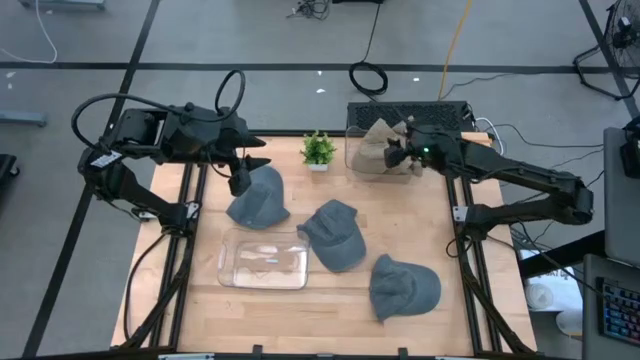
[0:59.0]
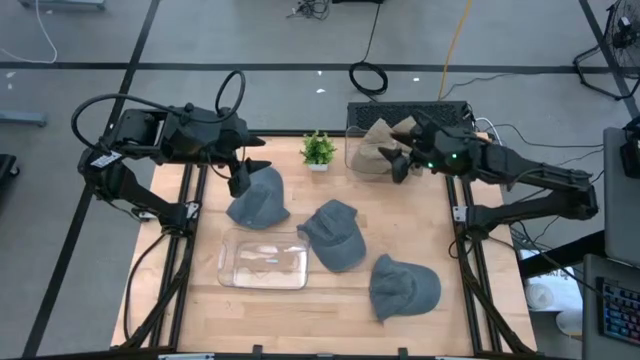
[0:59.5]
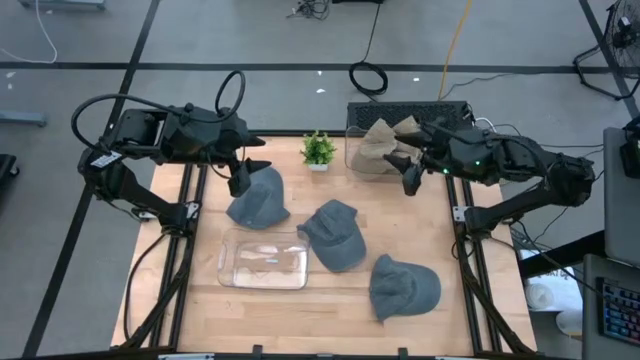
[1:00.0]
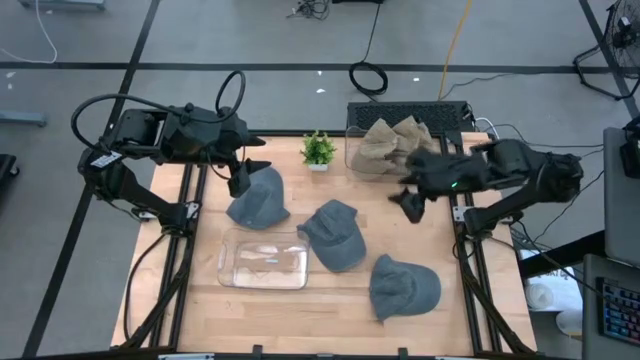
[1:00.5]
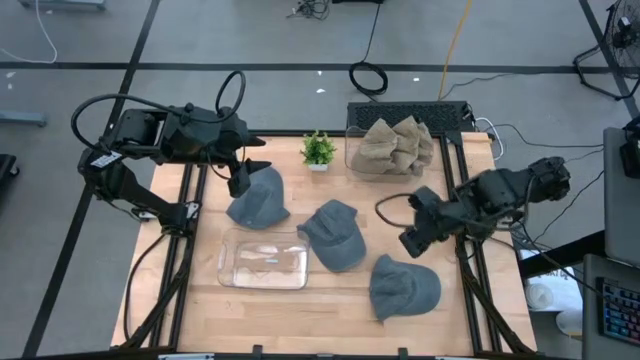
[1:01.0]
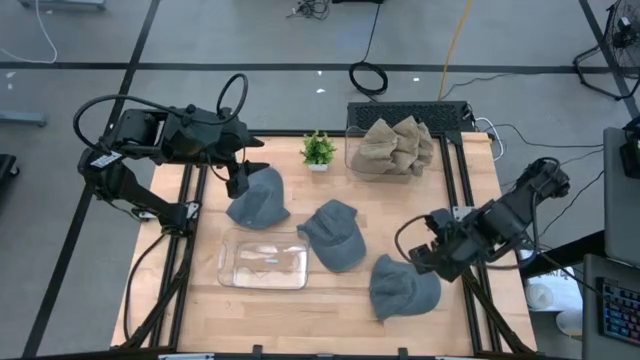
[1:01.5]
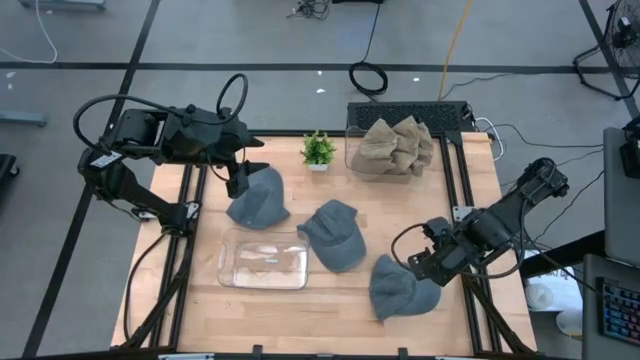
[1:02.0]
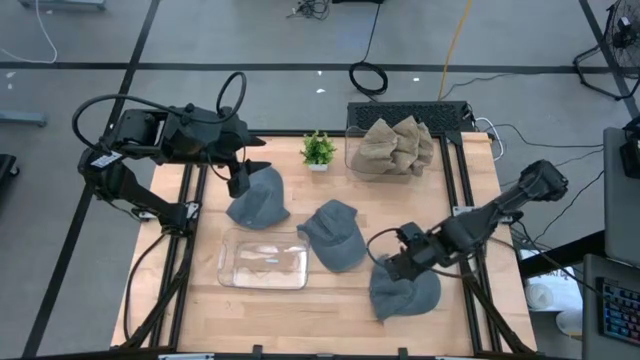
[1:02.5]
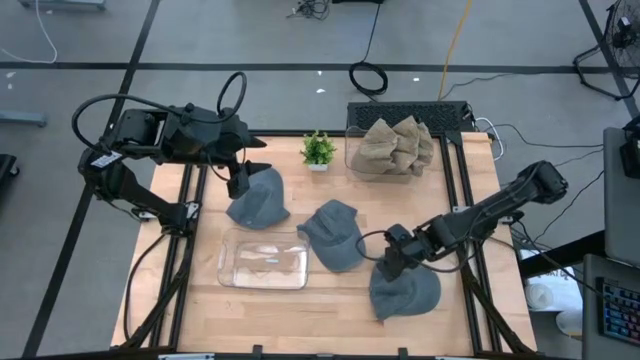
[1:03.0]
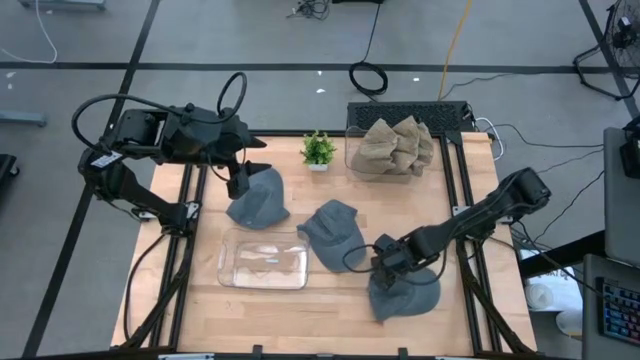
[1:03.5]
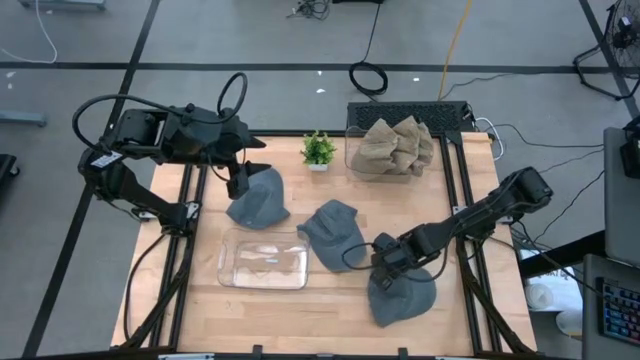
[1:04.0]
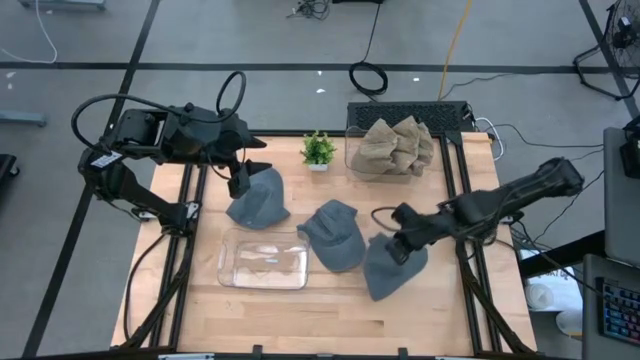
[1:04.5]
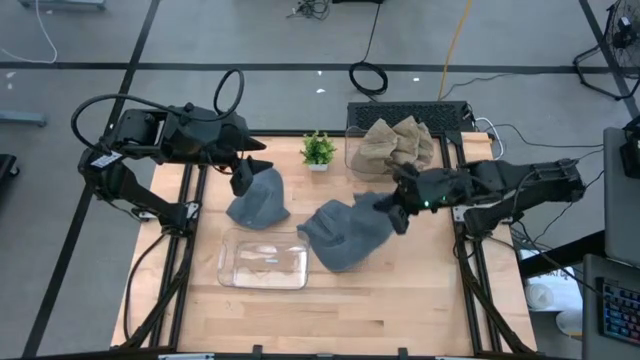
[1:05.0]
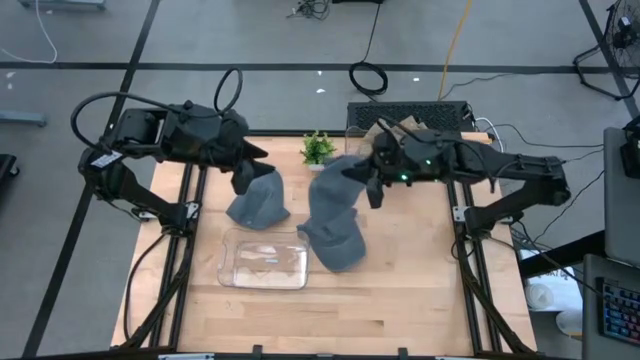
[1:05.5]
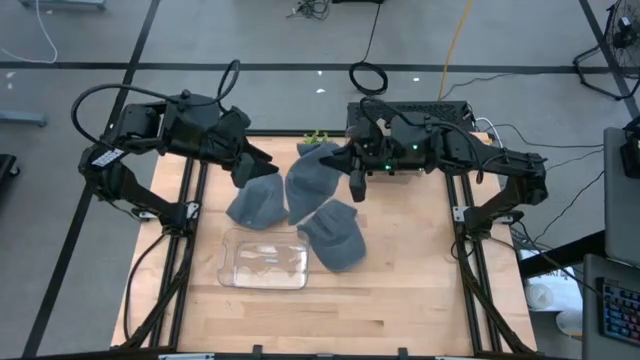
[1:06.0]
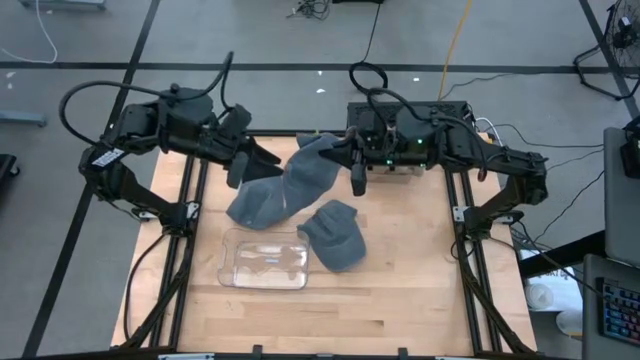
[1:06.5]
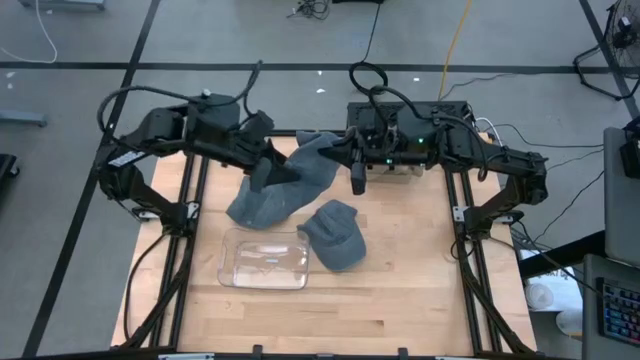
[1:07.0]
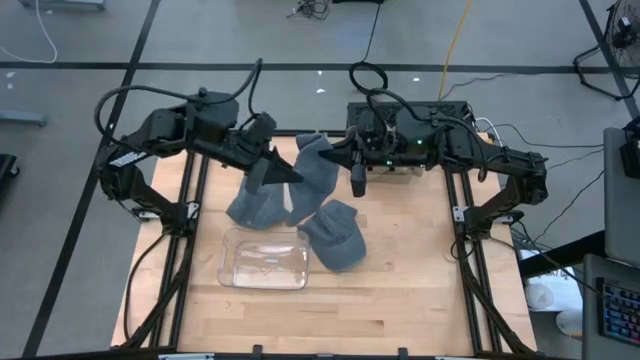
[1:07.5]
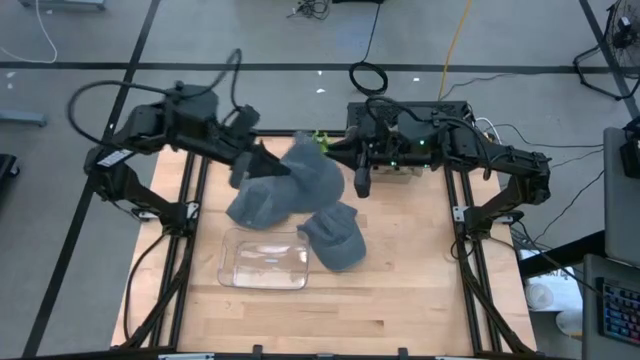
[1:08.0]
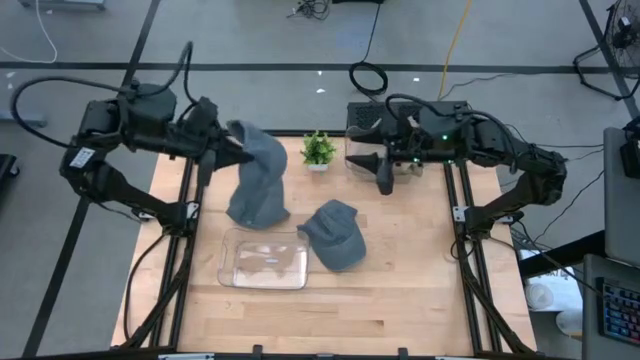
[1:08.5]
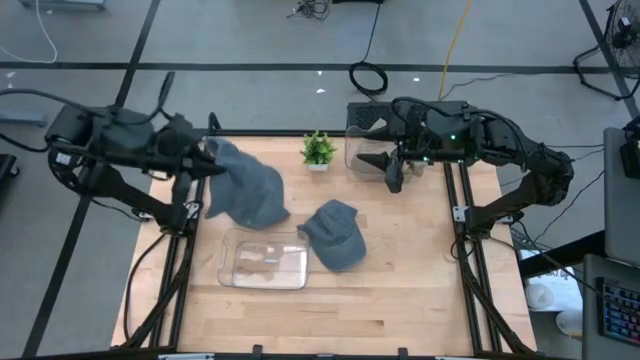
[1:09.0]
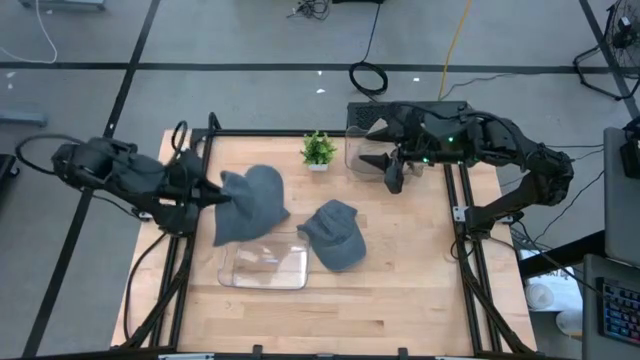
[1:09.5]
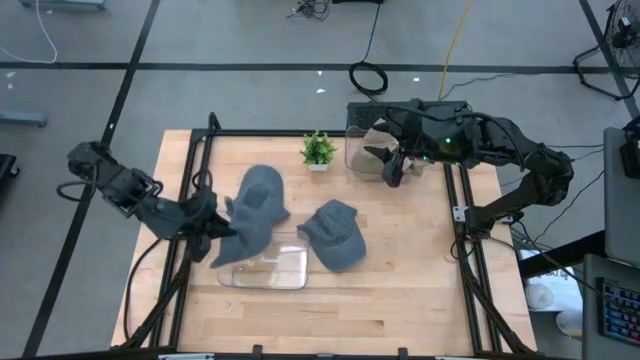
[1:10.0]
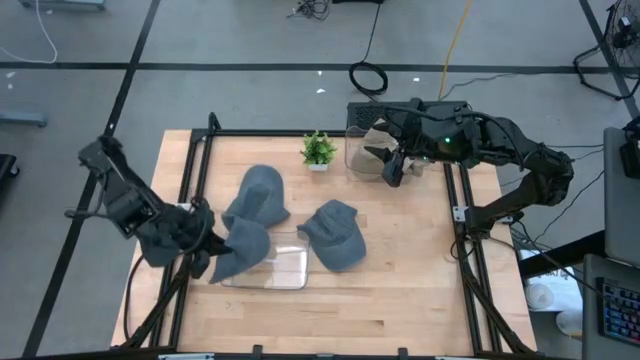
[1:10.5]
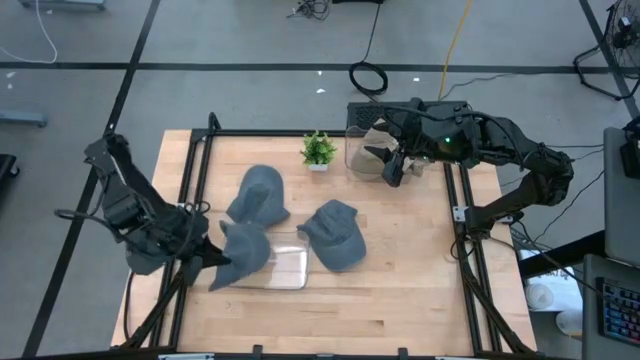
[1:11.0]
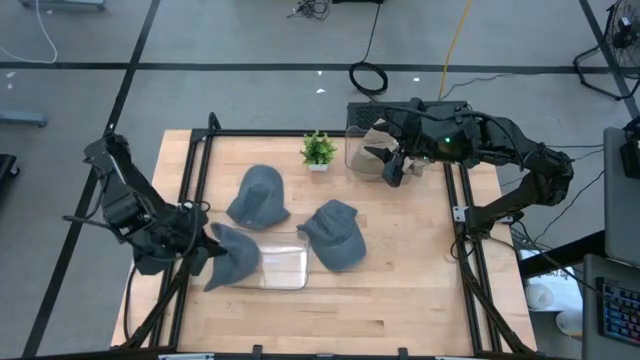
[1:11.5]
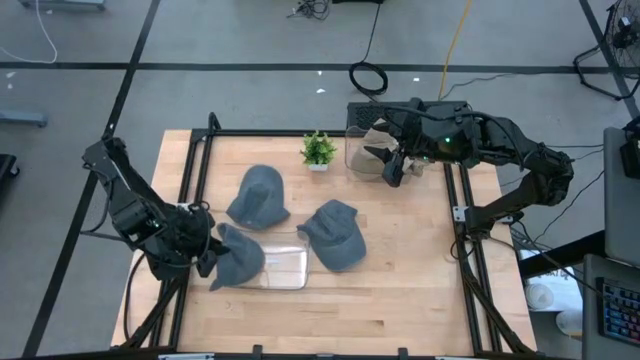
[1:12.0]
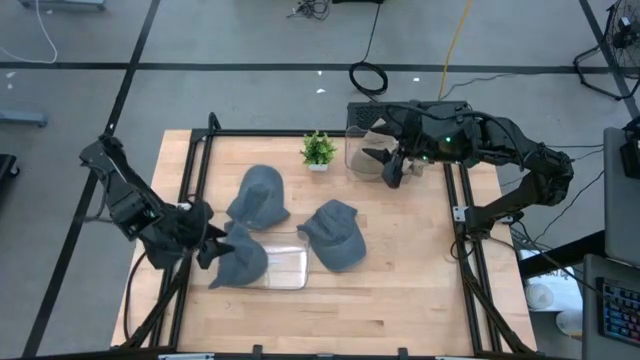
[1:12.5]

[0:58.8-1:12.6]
Task: Pick & Place hat
Put the bottom gray cap into the bottom transparent bin

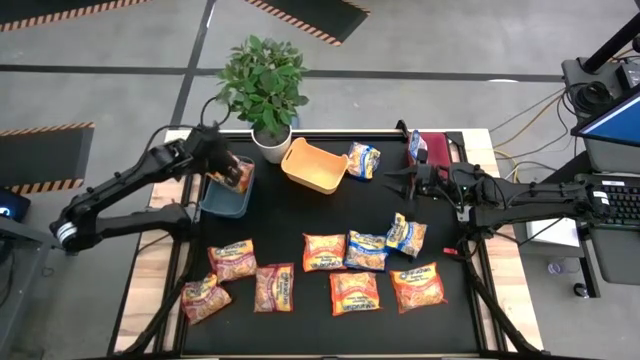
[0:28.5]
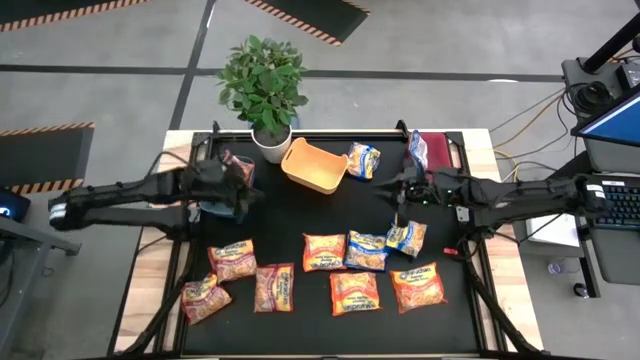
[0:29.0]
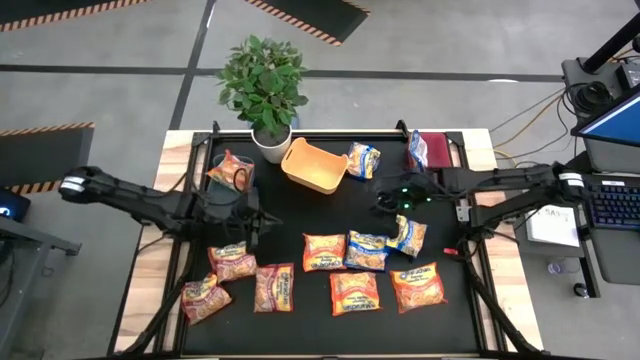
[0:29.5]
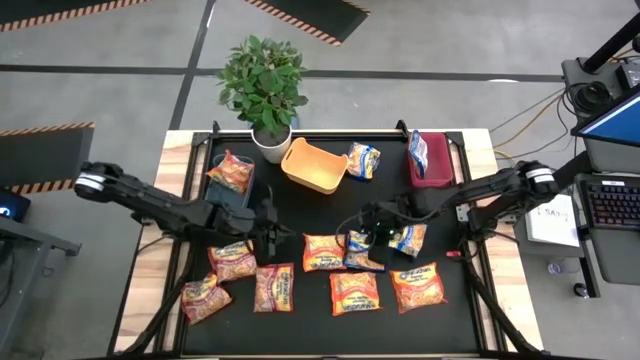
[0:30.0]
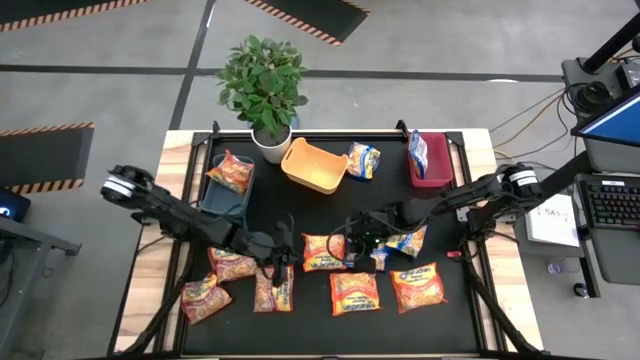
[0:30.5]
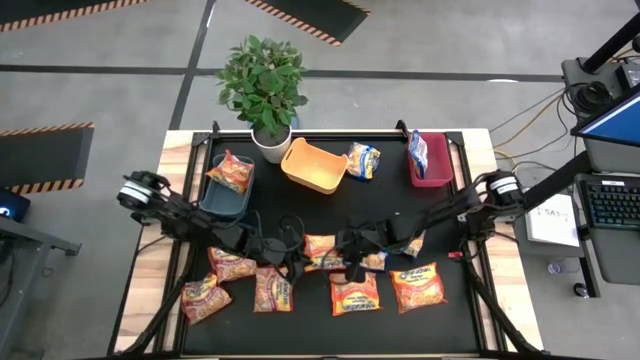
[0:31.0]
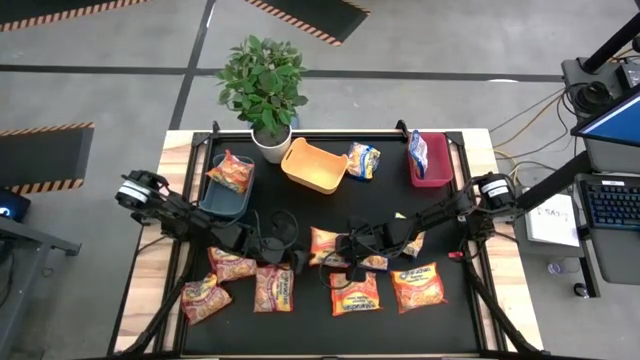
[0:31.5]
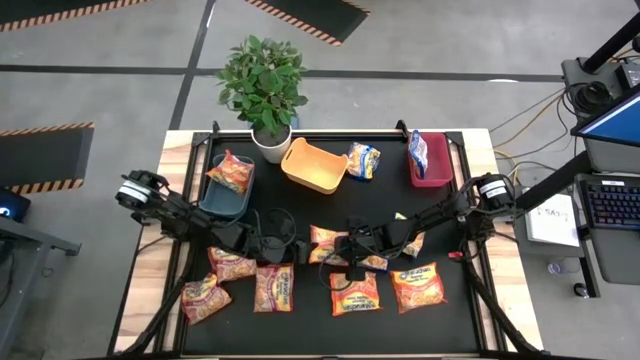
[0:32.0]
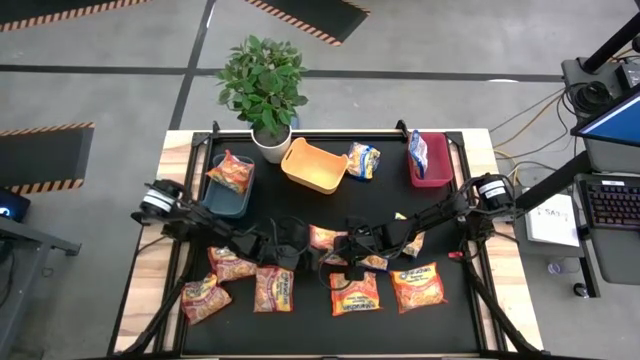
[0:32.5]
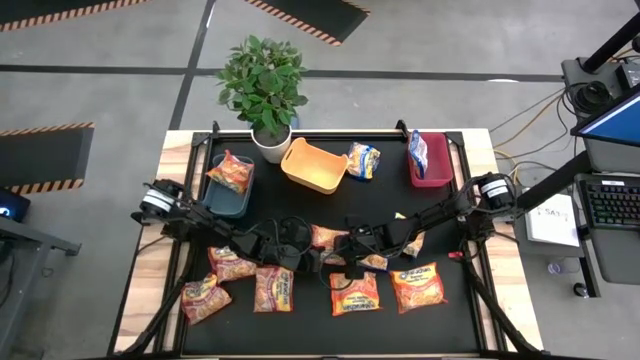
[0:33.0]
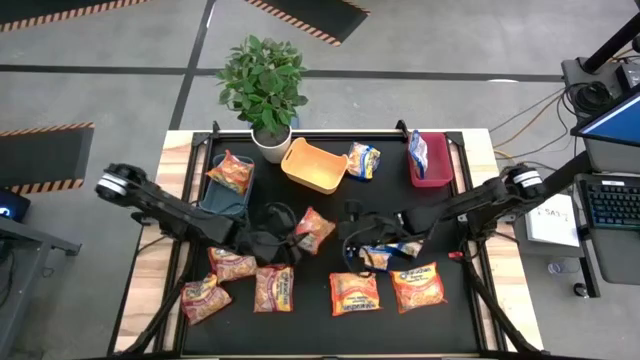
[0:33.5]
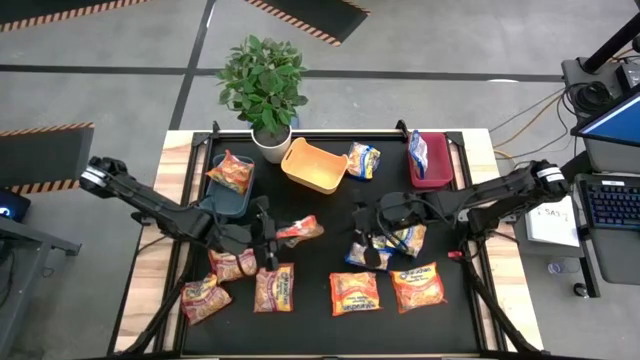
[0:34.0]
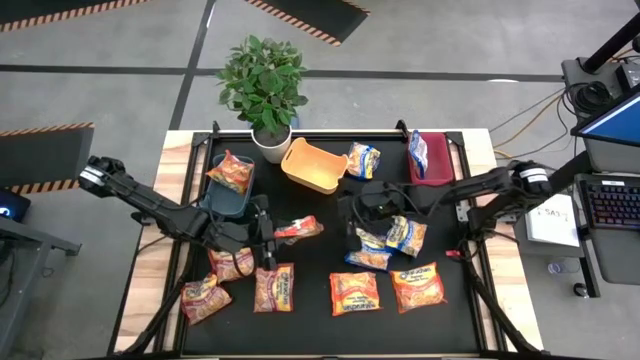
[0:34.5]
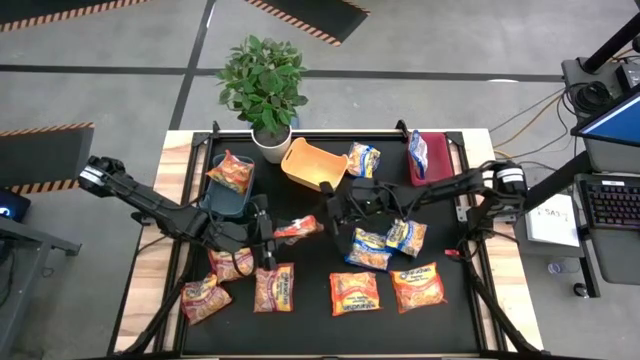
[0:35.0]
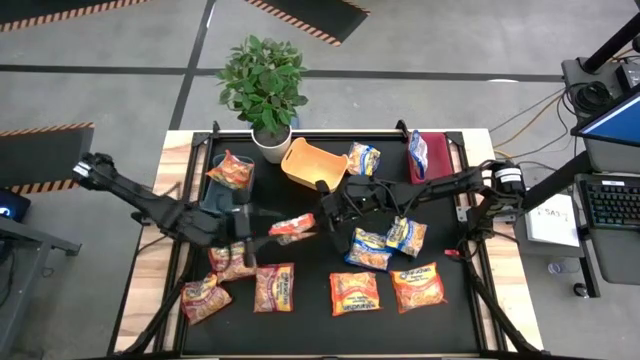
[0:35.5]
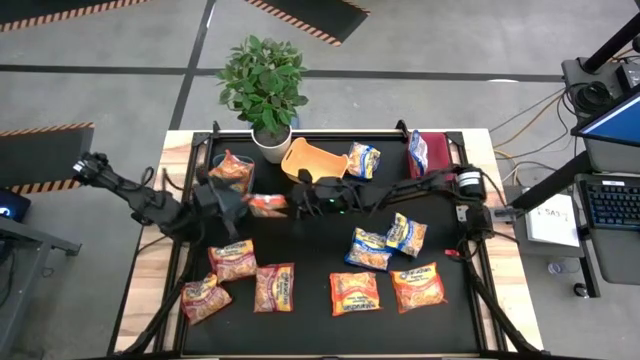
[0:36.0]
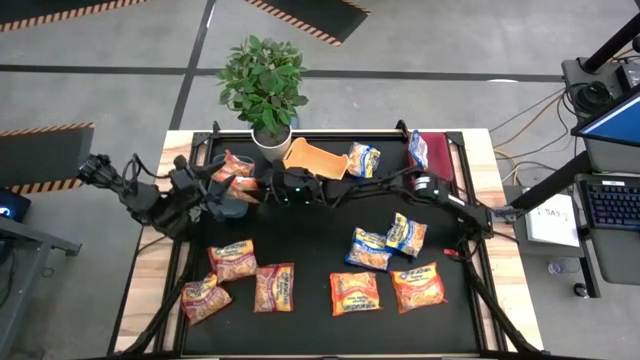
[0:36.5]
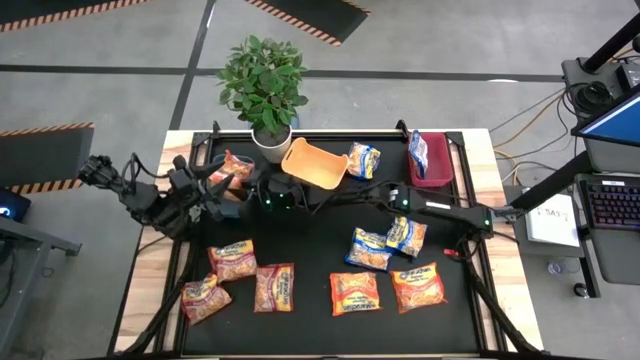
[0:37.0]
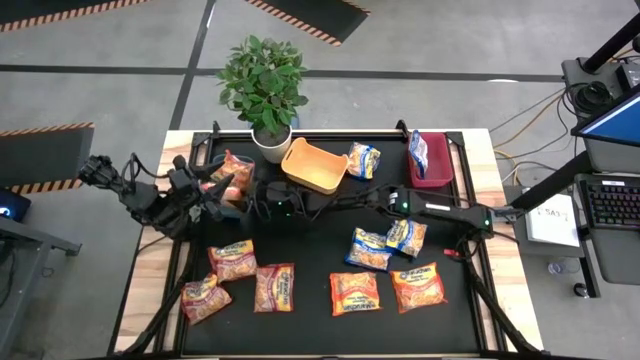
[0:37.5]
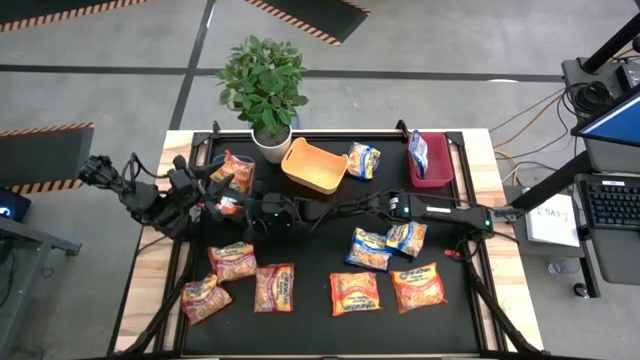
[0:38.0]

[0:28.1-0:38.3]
Task: Sort Maruchan noodles
Put the orange noodle pack into the blue bin
